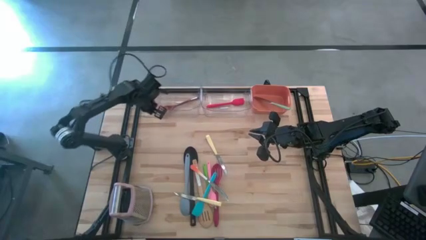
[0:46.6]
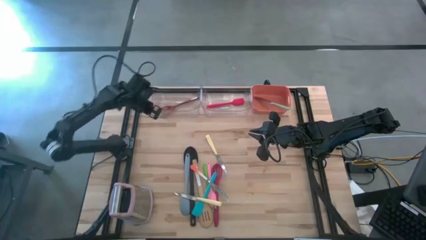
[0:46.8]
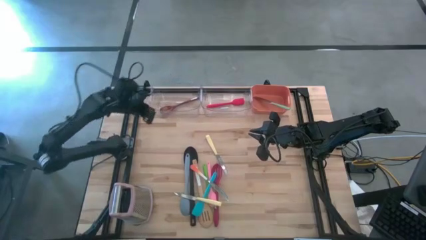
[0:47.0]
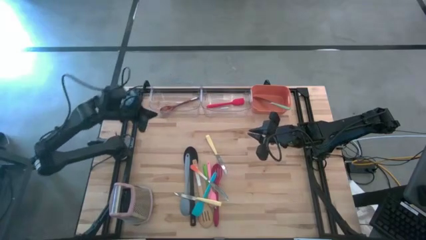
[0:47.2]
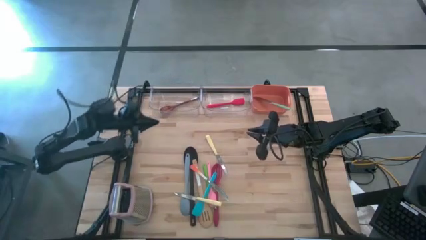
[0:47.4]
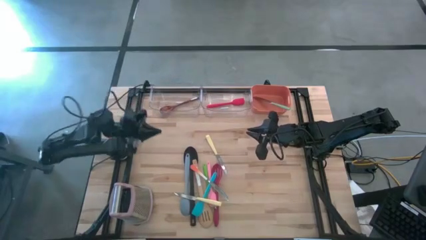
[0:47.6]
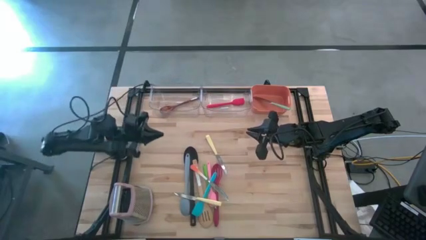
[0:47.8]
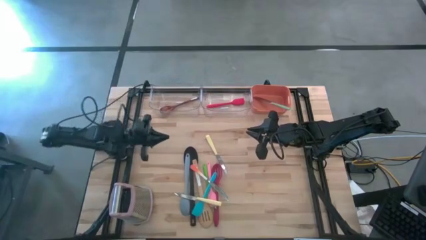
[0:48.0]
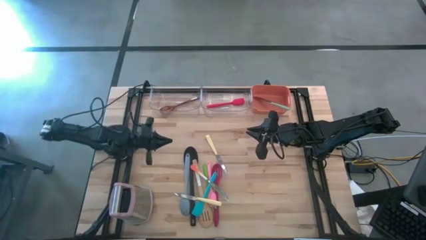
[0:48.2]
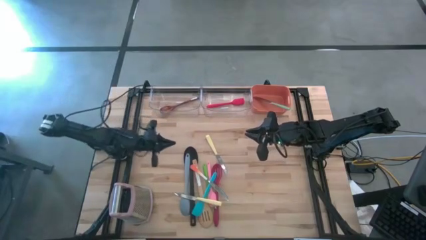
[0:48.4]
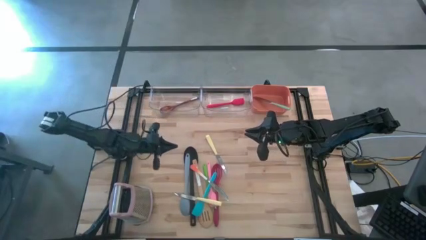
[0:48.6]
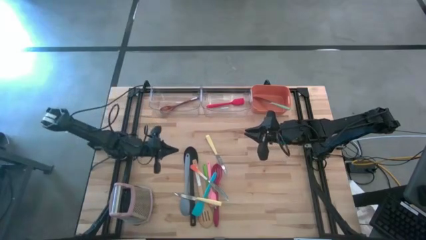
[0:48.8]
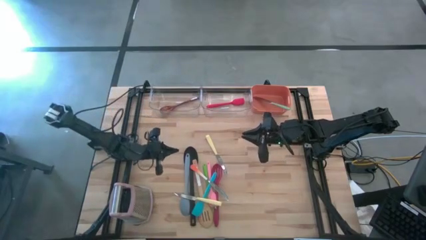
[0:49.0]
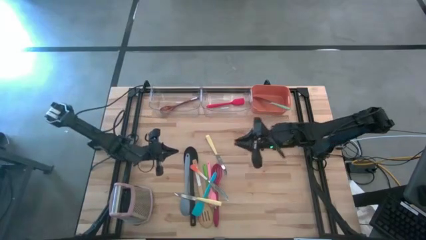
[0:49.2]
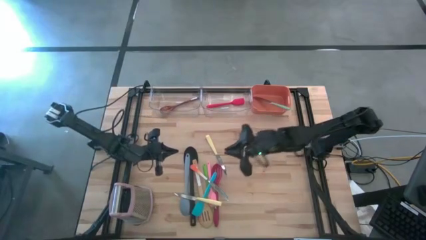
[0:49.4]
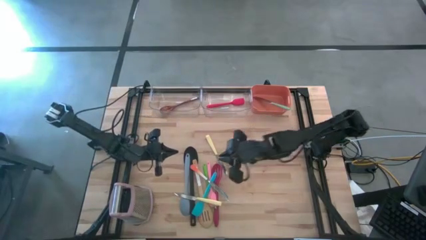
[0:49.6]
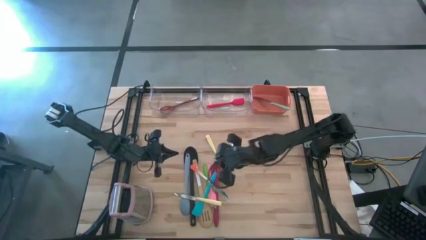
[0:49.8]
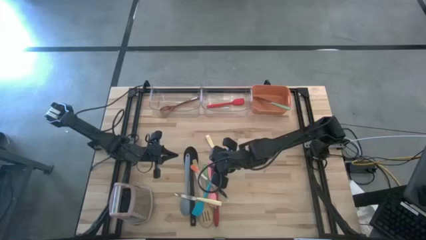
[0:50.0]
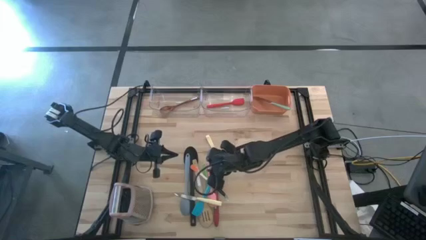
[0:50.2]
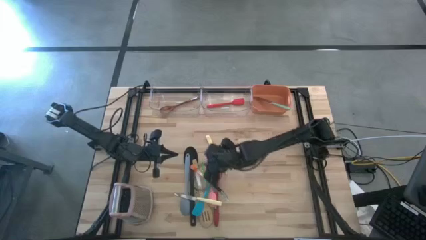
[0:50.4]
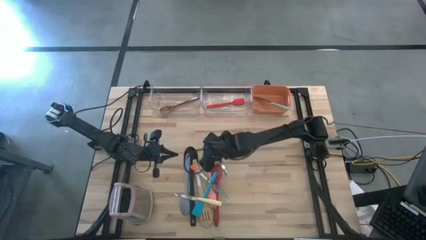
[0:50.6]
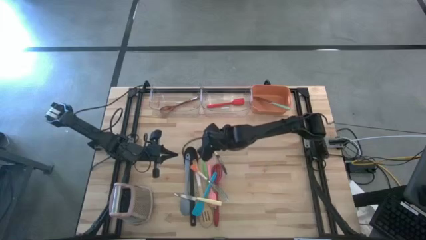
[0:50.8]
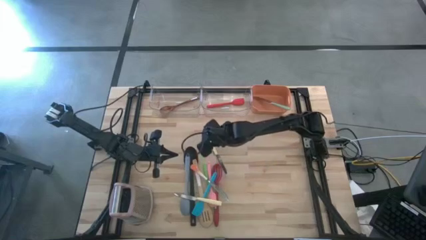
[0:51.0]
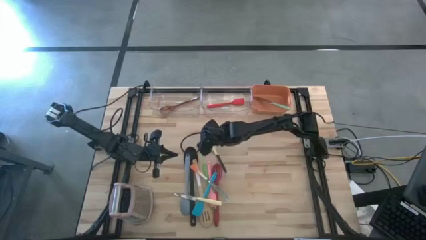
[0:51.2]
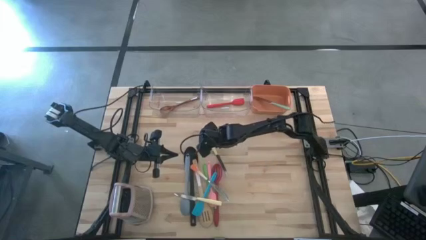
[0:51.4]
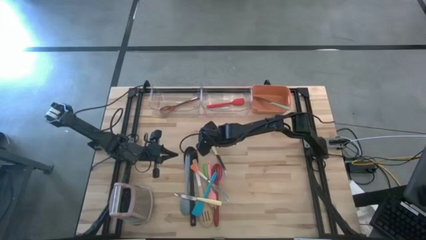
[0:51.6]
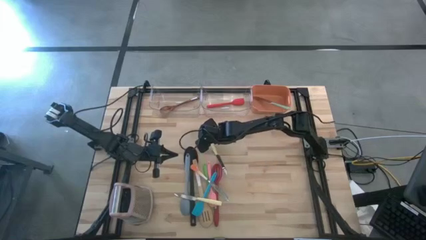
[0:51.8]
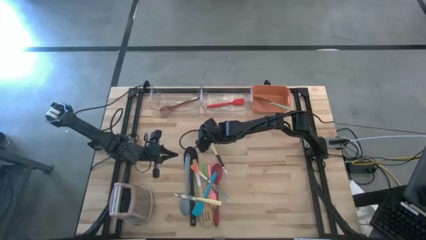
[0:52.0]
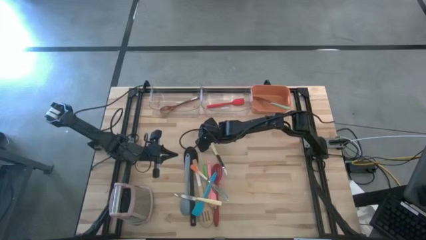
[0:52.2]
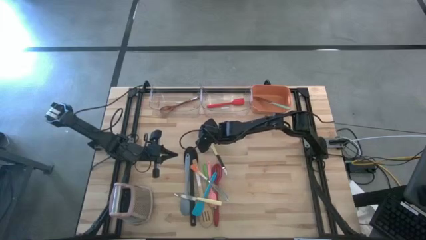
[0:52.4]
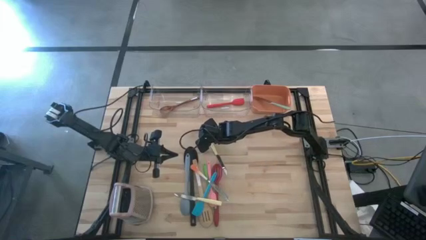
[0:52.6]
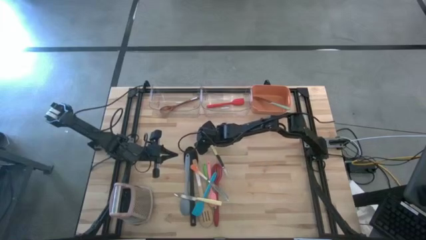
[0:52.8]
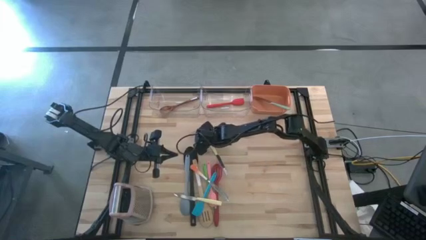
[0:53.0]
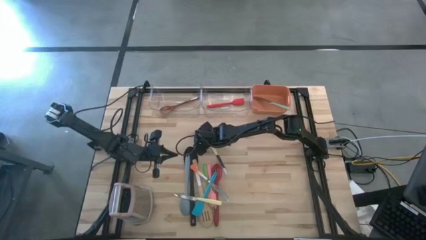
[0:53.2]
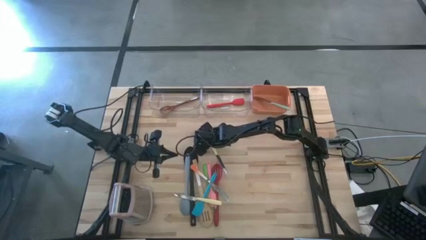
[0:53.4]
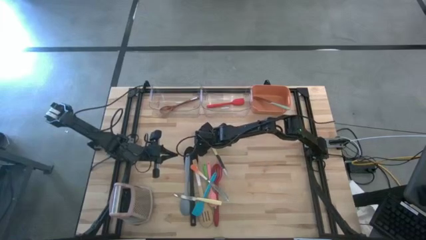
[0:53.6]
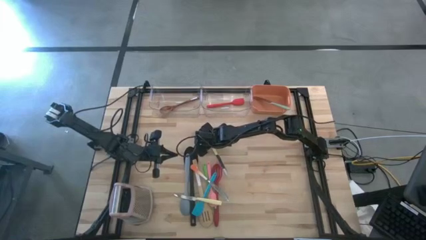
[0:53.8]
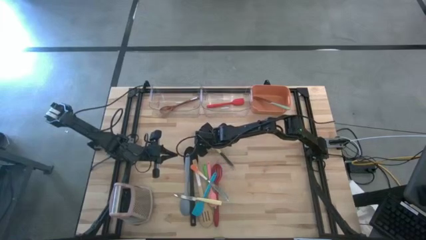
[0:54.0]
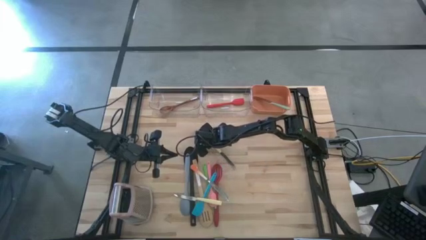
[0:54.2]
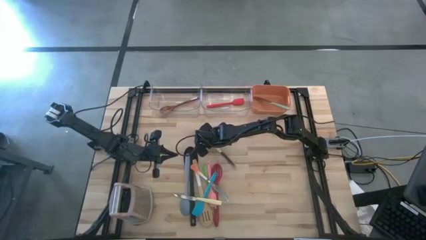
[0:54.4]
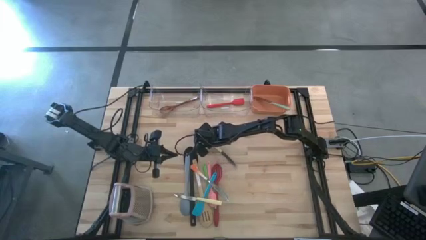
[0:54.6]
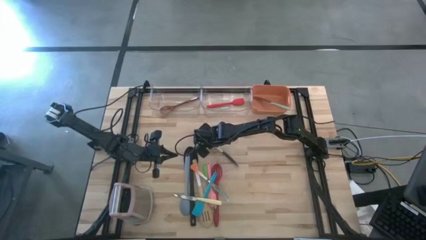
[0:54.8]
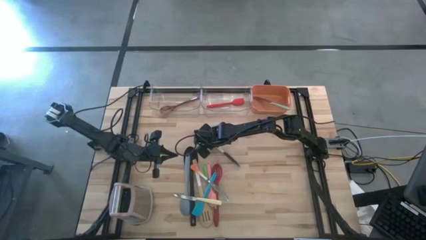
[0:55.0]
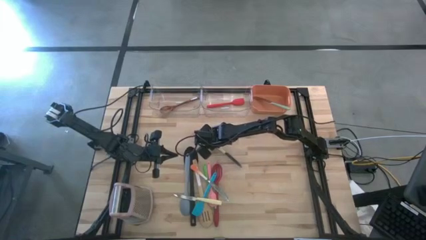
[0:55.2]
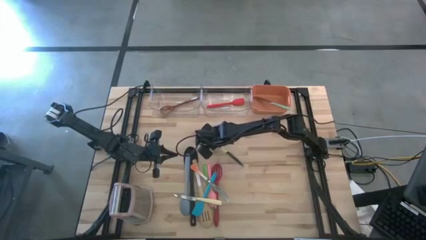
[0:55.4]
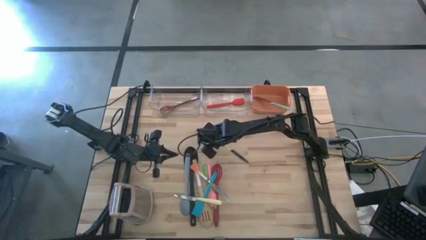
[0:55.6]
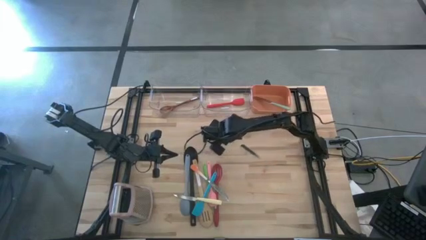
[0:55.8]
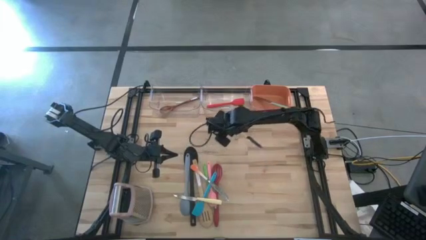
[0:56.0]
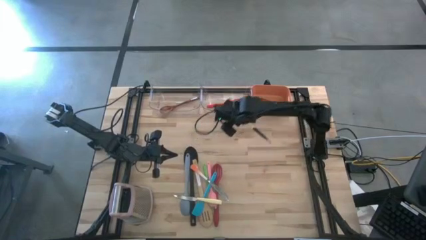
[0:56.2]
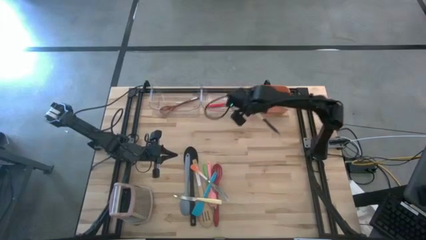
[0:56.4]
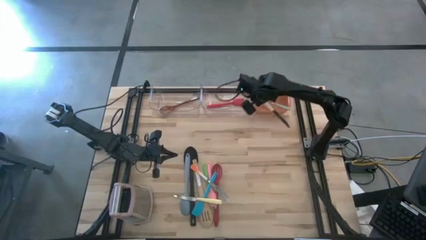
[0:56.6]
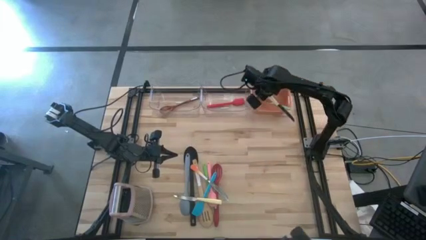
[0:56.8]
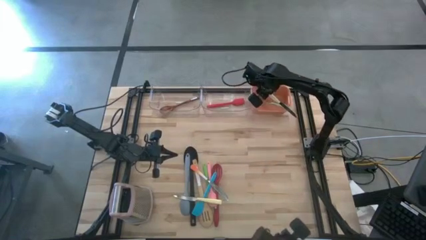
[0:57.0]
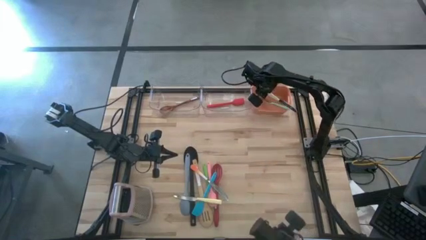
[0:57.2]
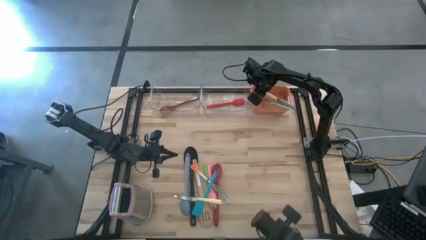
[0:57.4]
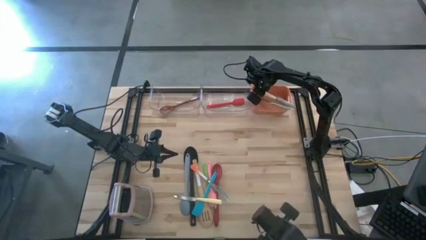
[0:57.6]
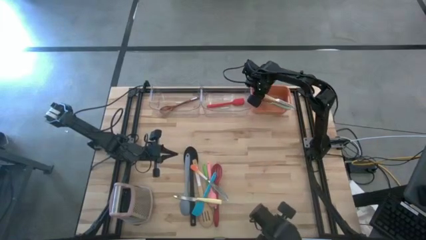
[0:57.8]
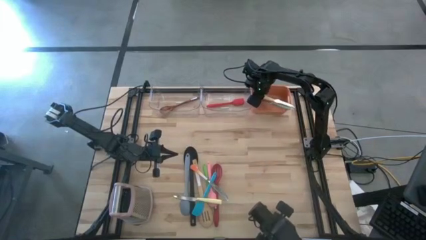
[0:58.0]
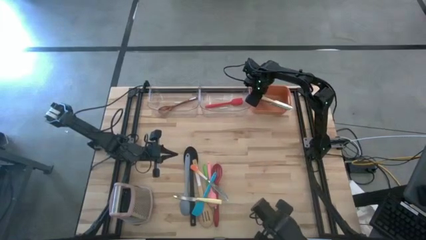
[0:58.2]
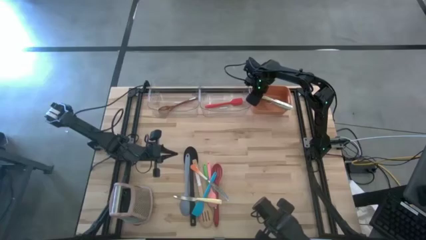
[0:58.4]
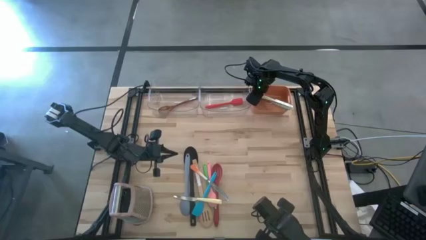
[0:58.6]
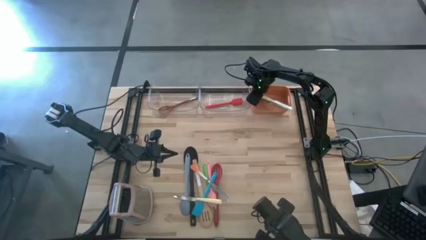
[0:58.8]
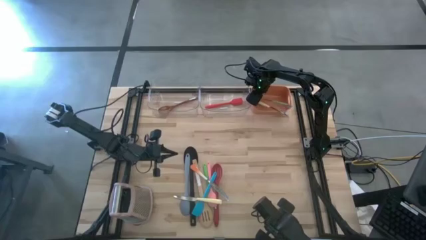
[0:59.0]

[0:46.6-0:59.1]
Task: Pick & Place Kitchen Items
Put the top white knife into the orange bin
